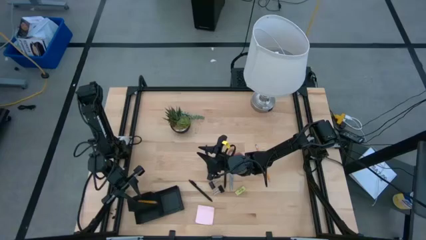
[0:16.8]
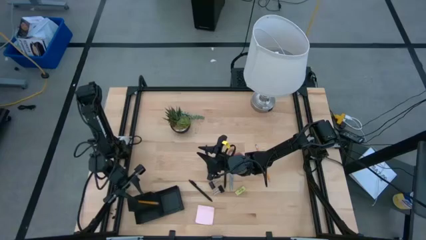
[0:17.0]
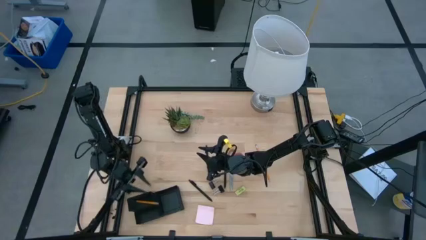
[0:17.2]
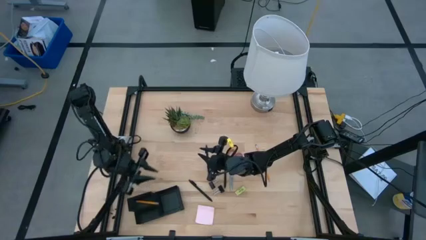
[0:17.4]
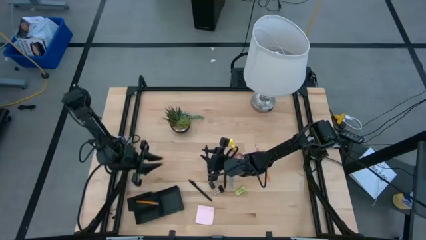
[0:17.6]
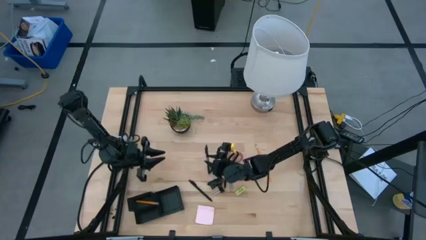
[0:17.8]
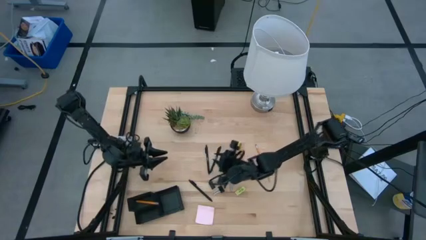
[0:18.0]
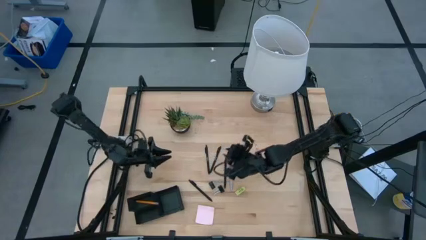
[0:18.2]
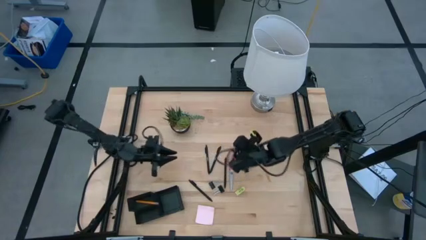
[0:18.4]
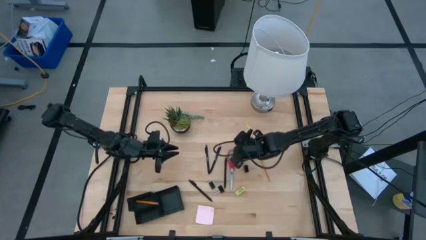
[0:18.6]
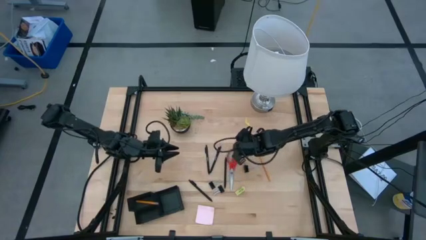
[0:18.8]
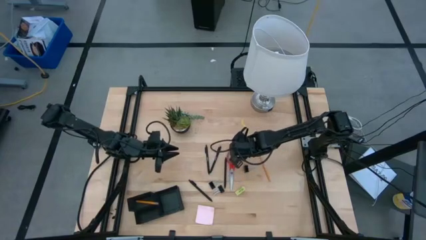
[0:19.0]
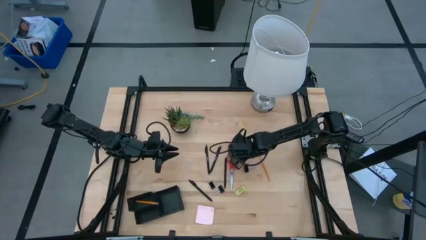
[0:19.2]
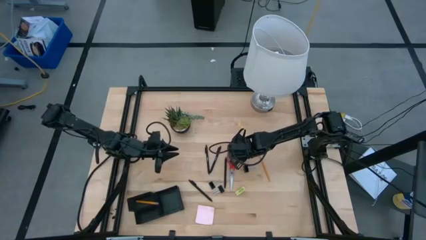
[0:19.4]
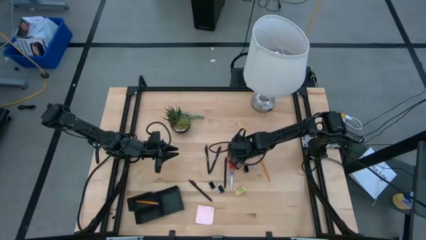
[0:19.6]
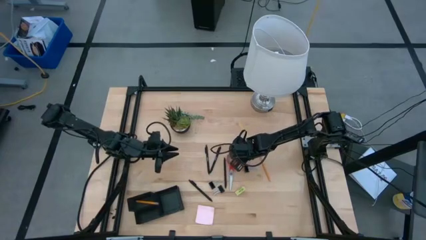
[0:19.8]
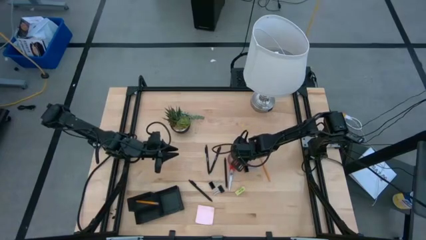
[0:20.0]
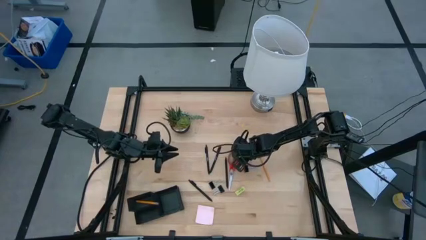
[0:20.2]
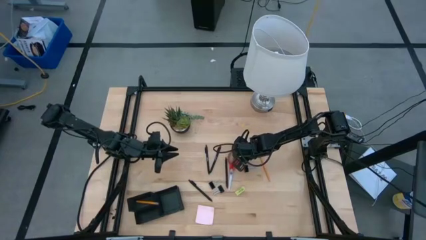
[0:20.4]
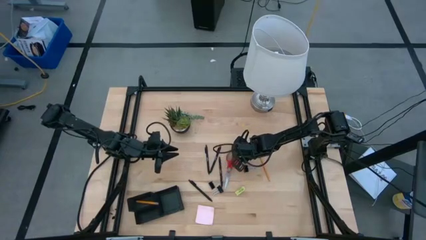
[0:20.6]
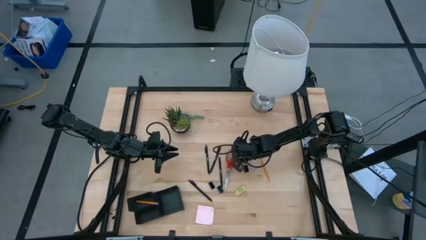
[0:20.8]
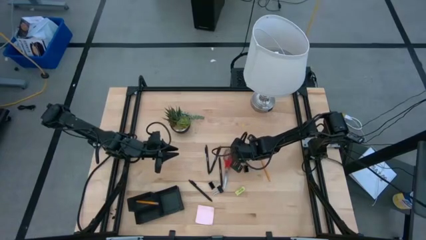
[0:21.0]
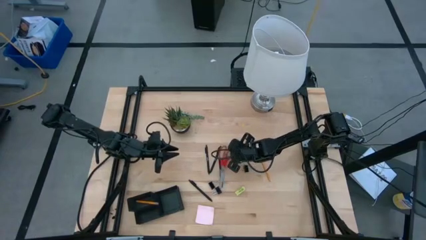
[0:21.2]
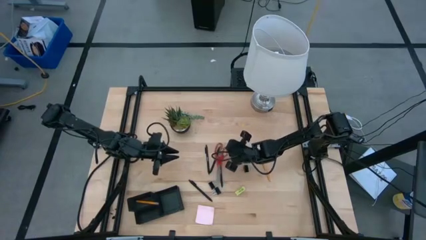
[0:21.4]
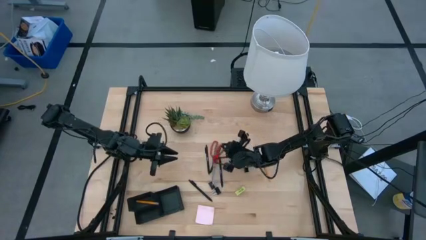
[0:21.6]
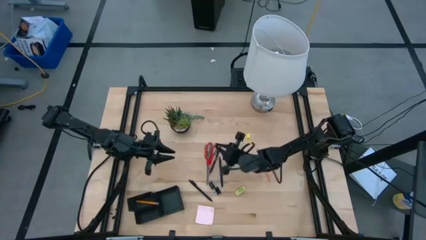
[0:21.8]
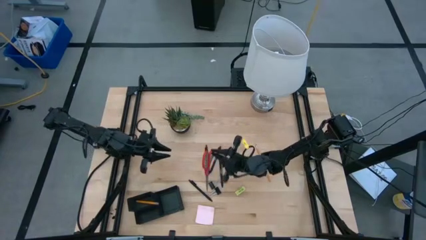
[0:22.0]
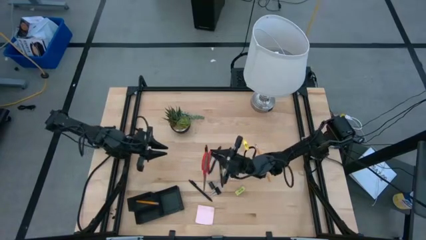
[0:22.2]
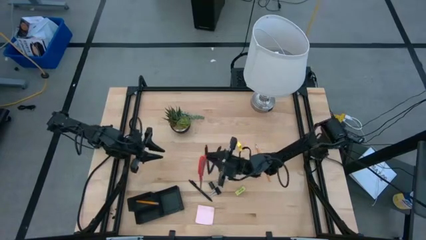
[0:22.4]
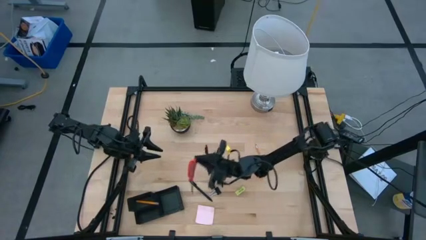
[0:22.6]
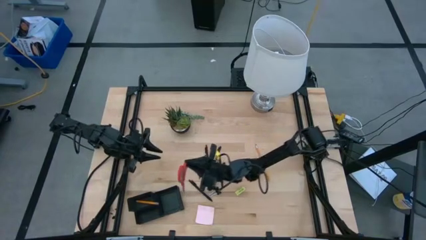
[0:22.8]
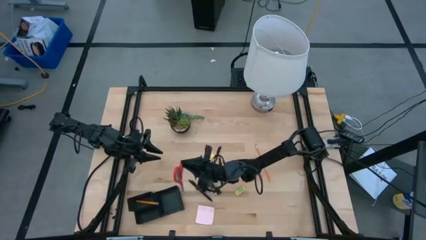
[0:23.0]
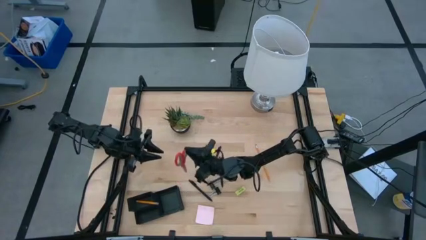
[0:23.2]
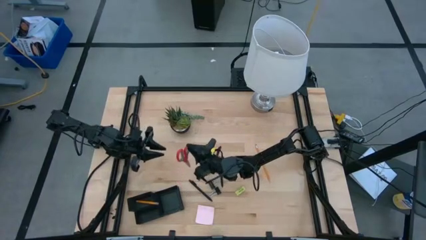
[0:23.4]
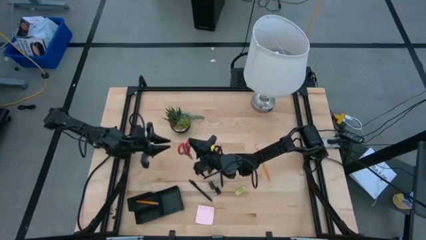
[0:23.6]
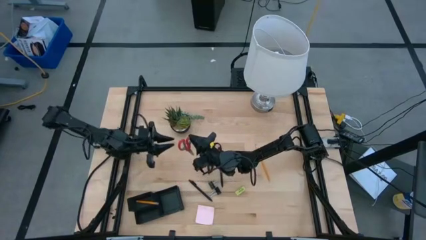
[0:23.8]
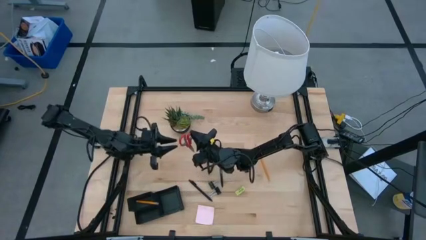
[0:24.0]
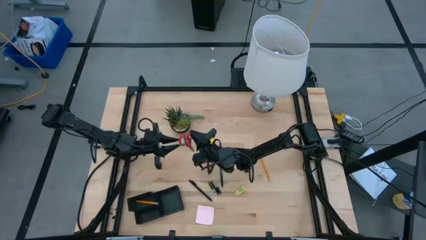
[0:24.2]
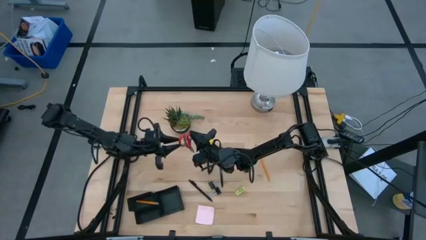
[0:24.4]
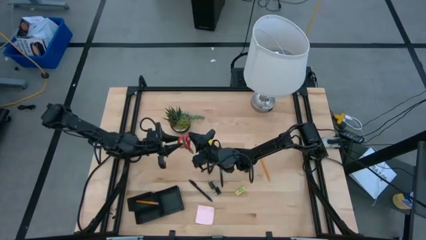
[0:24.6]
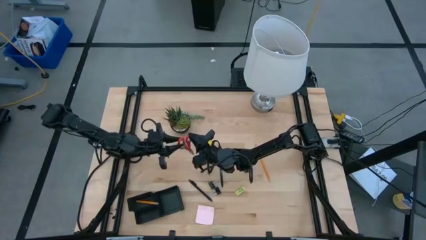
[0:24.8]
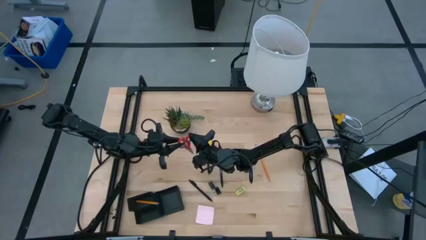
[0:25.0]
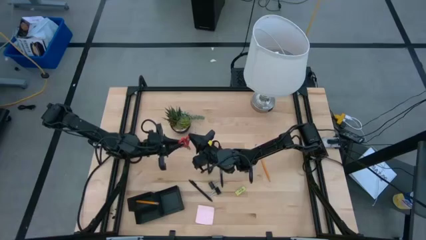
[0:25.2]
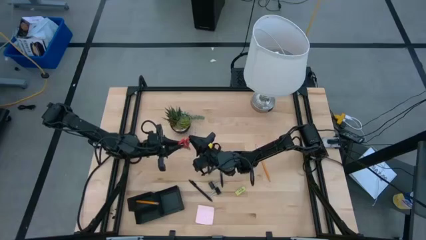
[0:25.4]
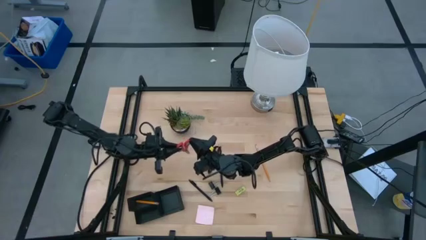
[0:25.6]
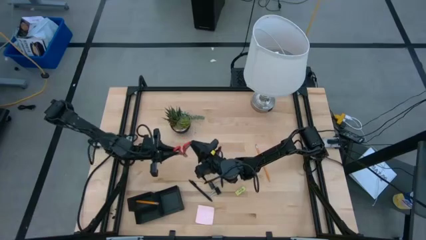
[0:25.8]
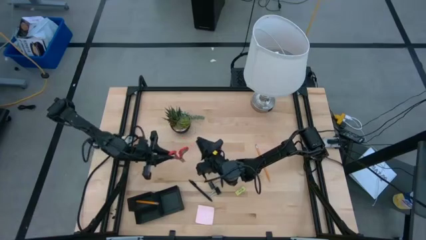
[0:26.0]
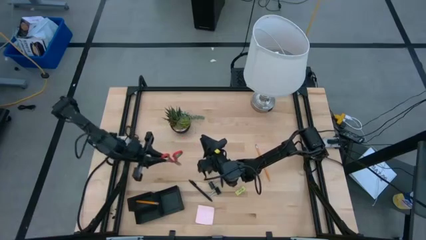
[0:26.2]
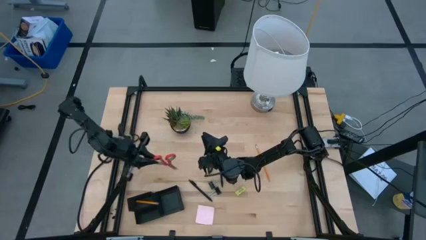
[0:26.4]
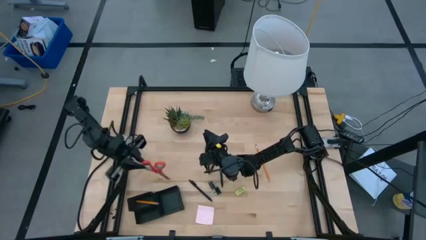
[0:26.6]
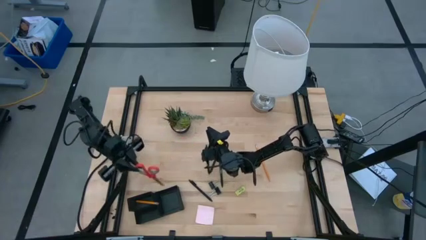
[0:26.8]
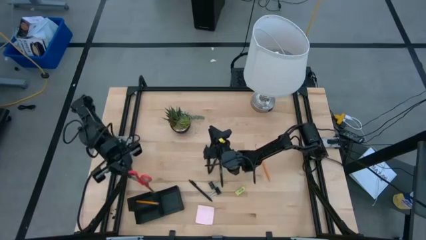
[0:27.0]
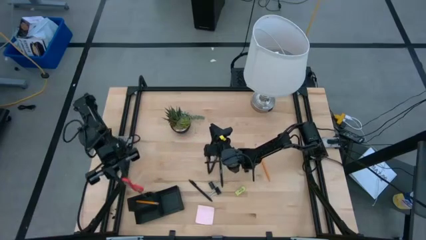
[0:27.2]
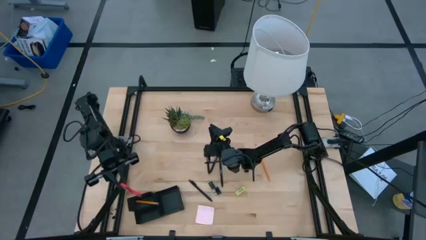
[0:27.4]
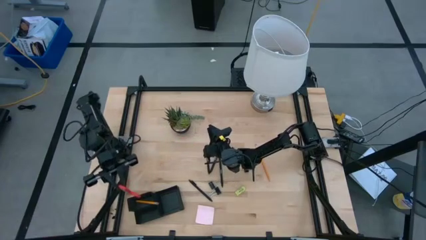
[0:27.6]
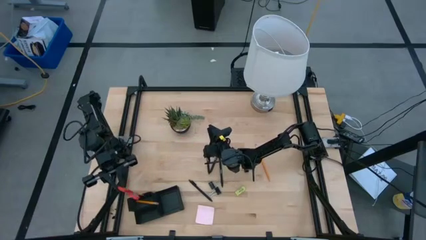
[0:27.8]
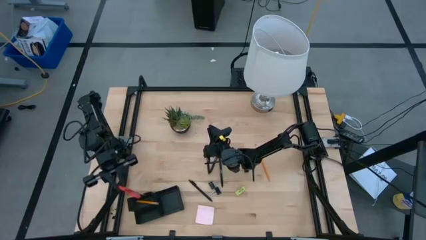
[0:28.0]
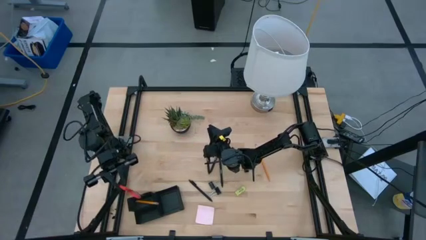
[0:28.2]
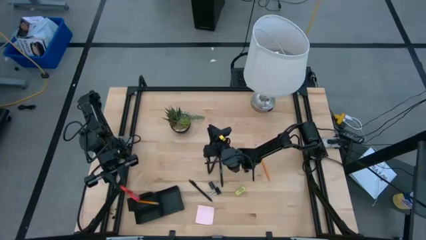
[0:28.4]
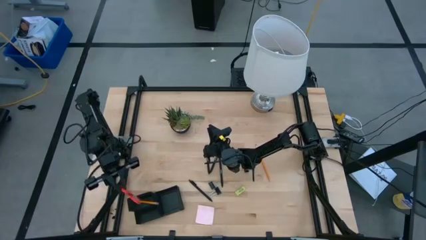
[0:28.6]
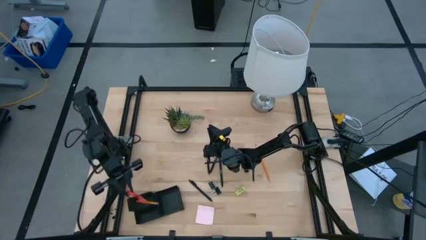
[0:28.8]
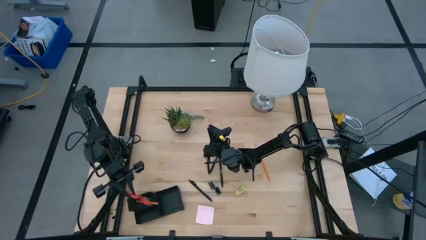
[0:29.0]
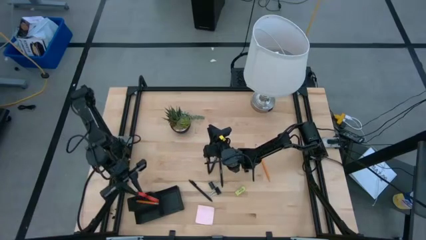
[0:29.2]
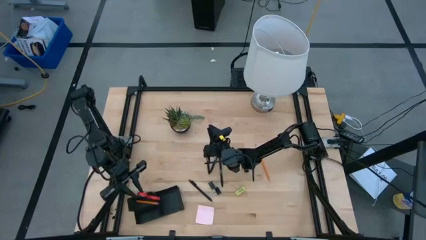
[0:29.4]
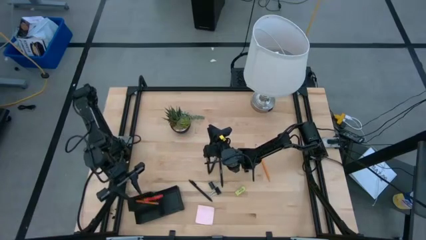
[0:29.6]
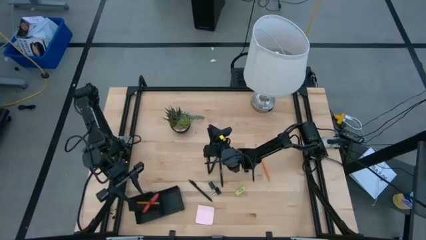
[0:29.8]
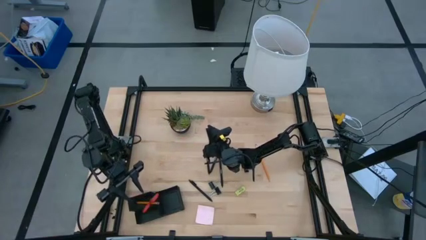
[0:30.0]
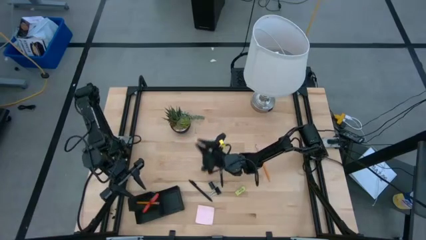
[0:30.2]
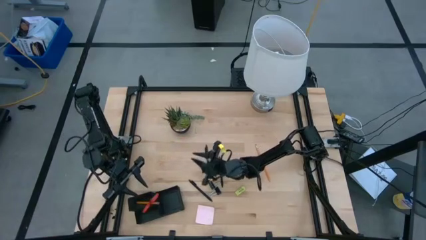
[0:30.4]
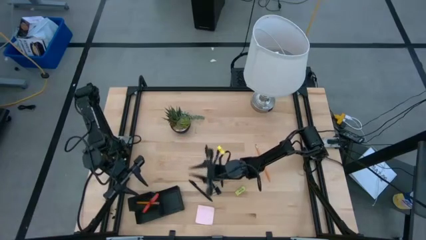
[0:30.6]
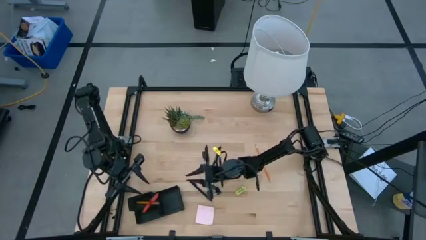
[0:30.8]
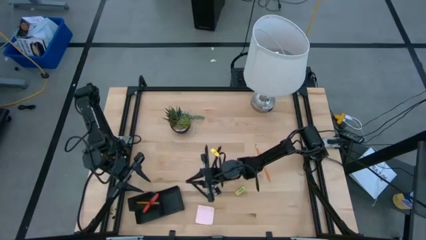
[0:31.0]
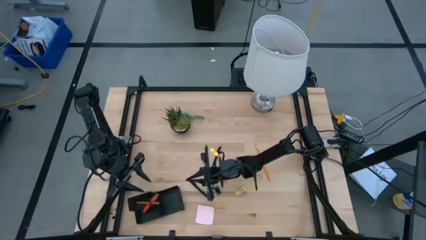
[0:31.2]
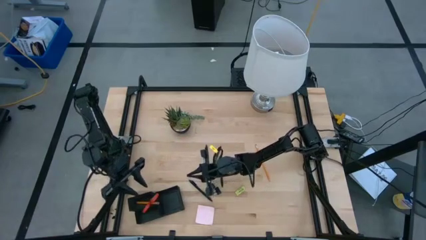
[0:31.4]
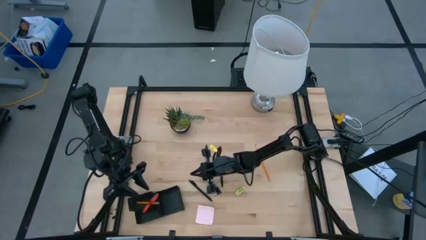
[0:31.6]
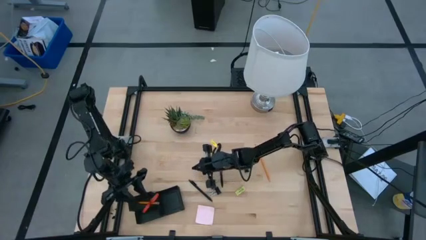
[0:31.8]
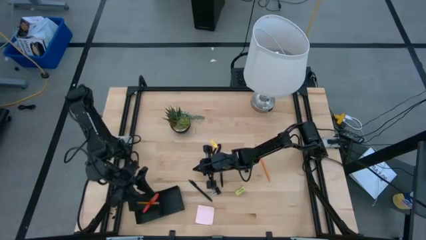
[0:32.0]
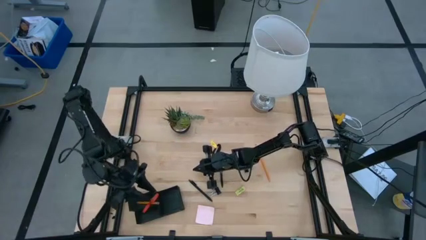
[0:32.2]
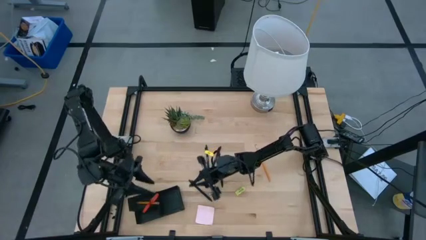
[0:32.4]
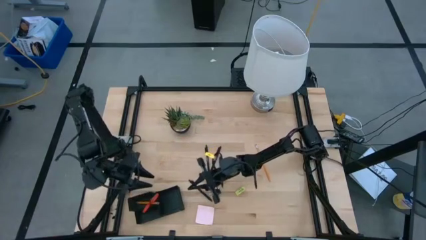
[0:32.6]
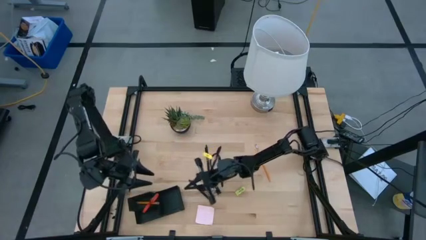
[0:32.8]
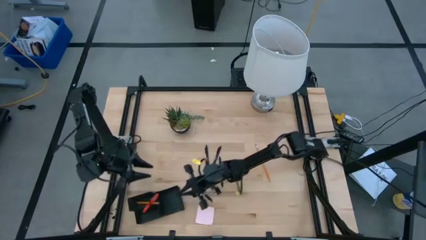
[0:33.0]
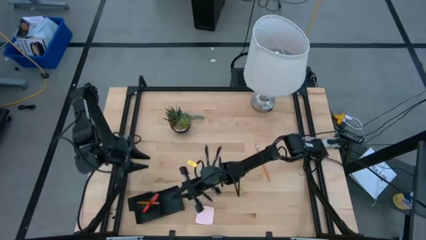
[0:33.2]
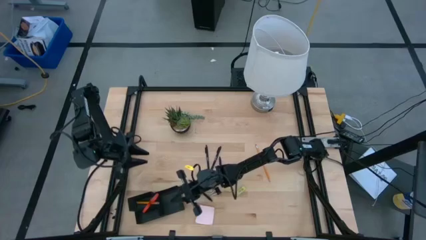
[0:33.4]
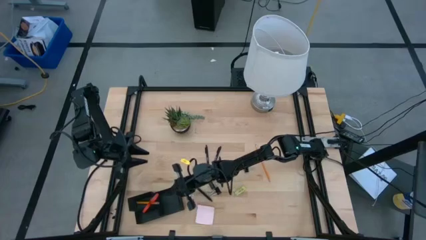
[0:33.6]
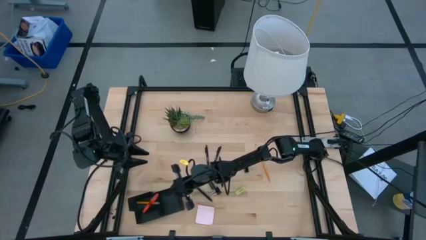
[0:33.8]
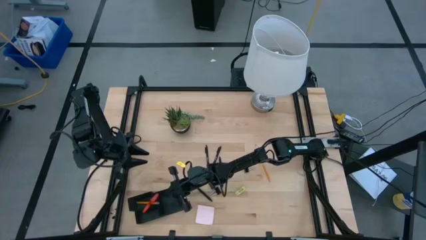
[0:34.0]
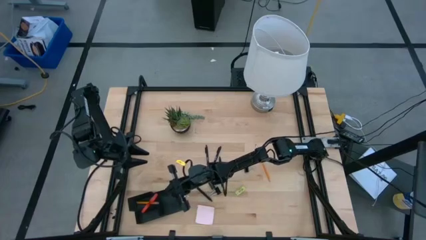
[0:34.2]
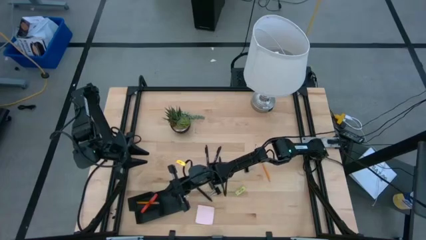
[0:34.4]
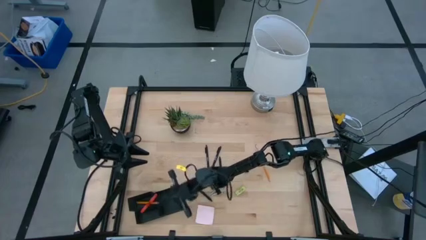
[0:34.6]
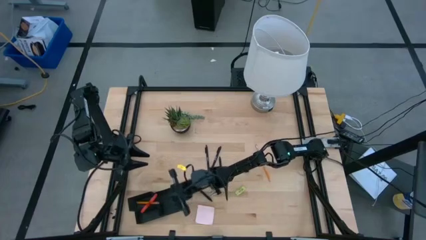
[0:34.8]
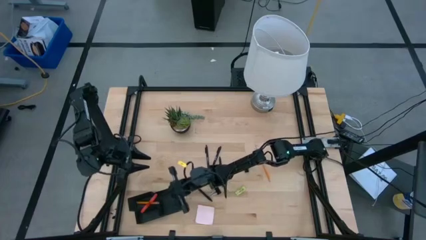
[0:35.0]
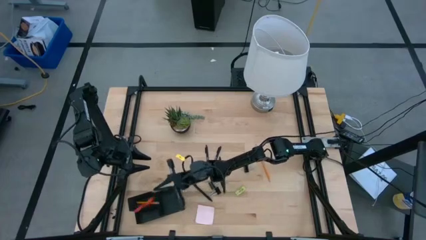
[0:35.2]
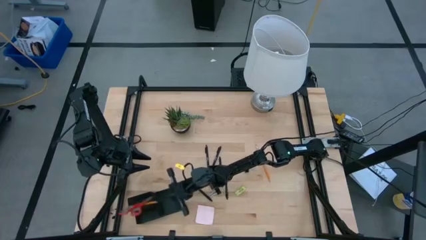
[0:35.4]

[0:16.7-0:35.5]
Task: Pick and place office supplies into organizer
Put the scissors into the top left section of the desk organizer
